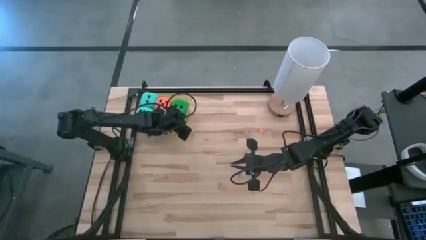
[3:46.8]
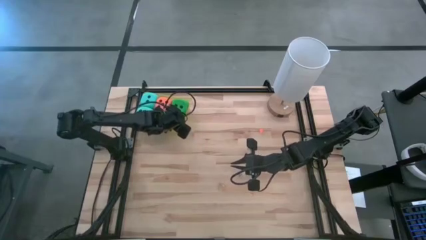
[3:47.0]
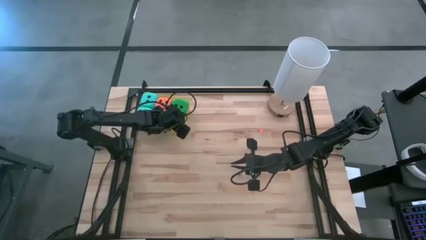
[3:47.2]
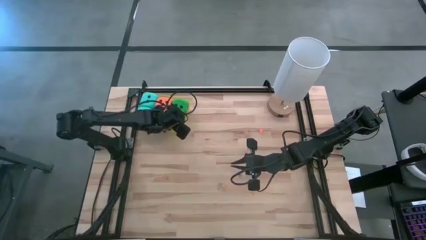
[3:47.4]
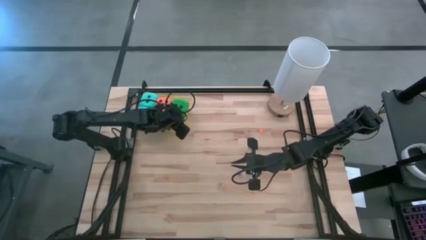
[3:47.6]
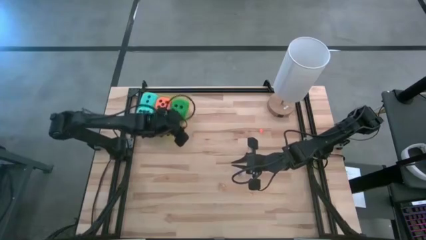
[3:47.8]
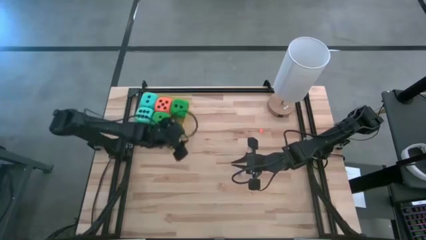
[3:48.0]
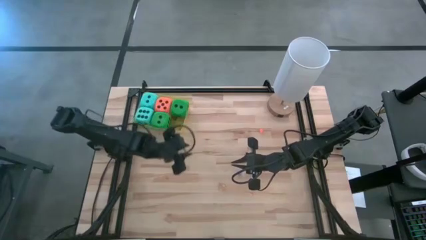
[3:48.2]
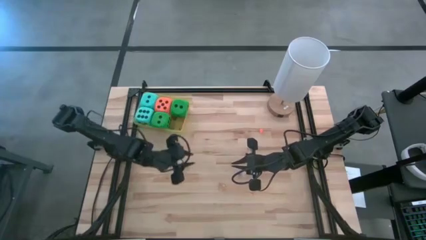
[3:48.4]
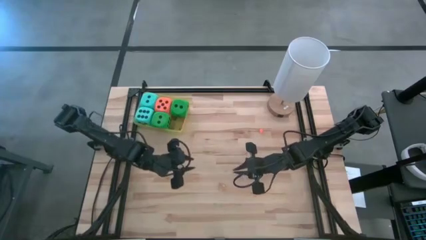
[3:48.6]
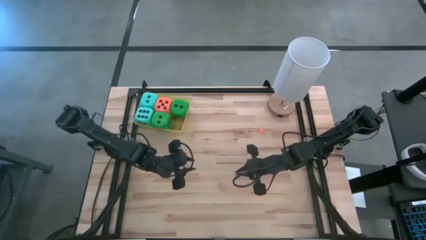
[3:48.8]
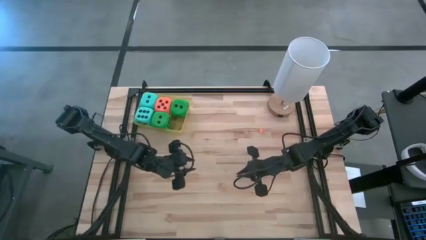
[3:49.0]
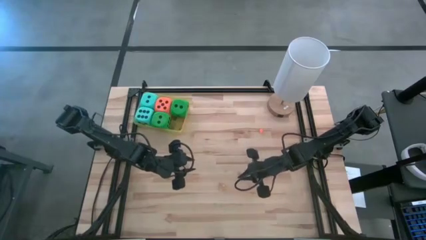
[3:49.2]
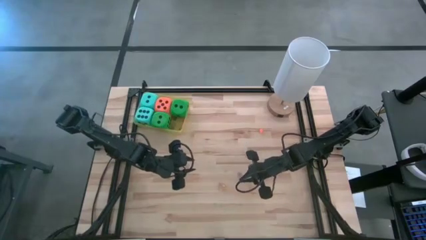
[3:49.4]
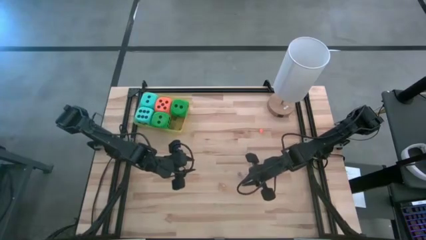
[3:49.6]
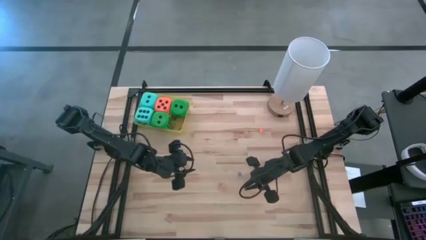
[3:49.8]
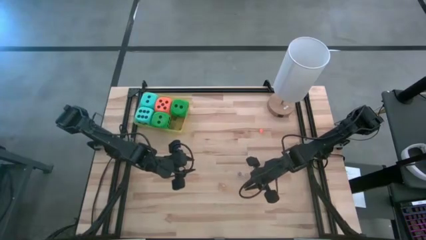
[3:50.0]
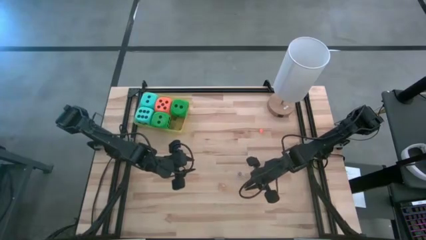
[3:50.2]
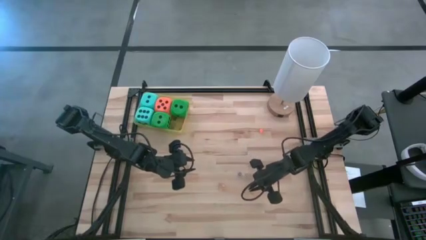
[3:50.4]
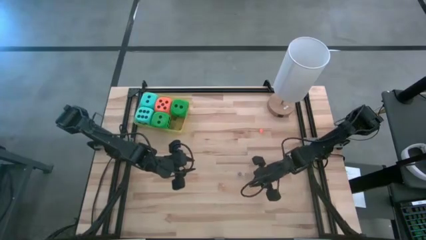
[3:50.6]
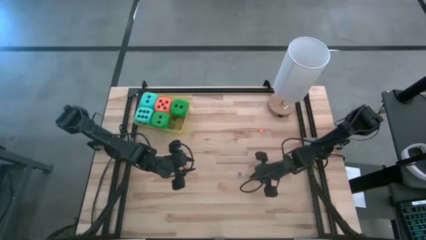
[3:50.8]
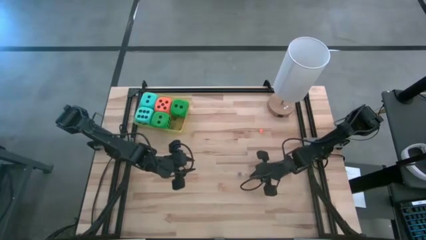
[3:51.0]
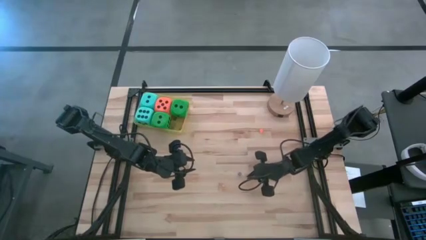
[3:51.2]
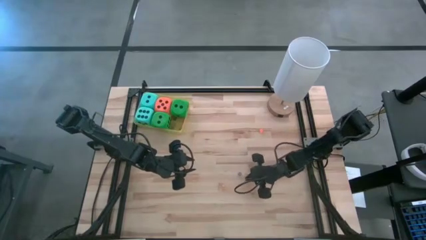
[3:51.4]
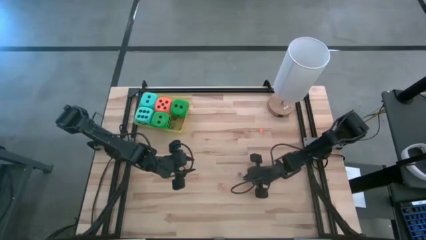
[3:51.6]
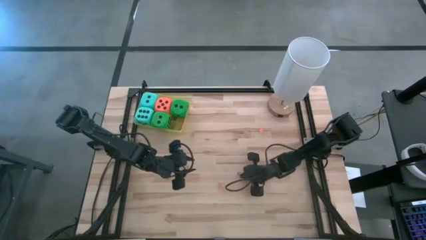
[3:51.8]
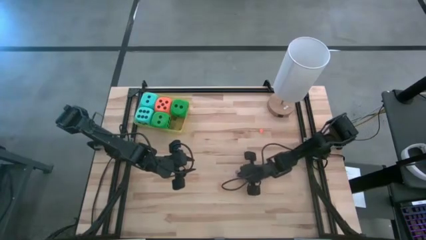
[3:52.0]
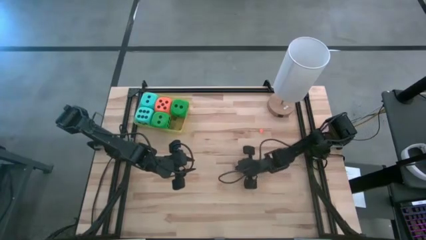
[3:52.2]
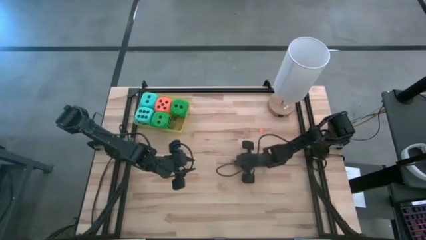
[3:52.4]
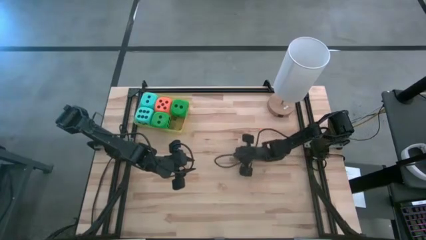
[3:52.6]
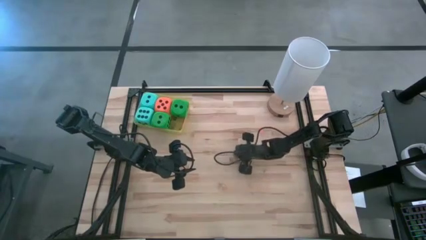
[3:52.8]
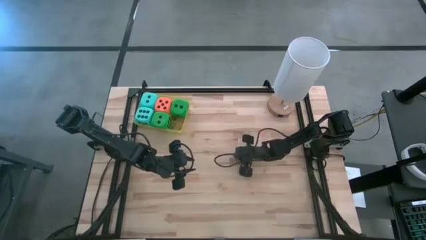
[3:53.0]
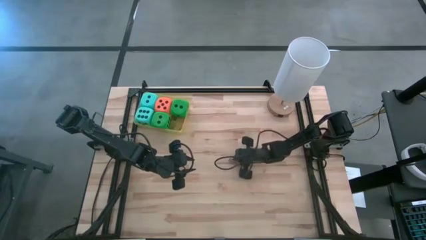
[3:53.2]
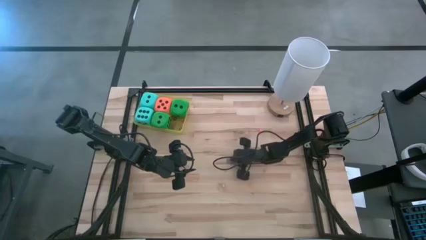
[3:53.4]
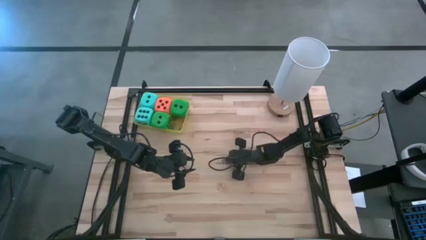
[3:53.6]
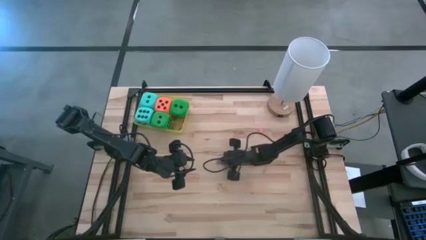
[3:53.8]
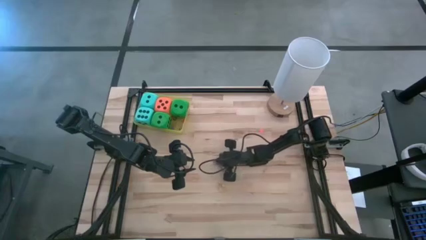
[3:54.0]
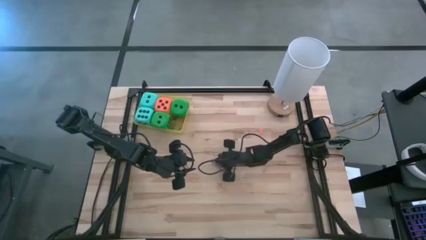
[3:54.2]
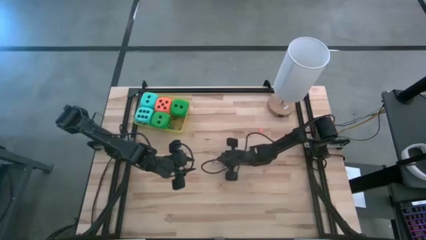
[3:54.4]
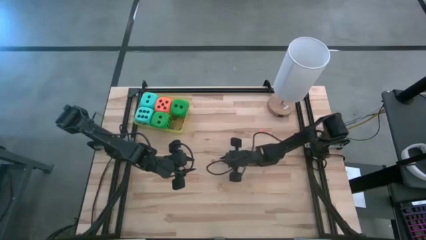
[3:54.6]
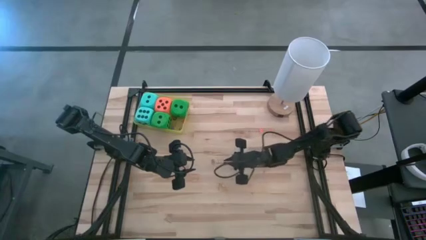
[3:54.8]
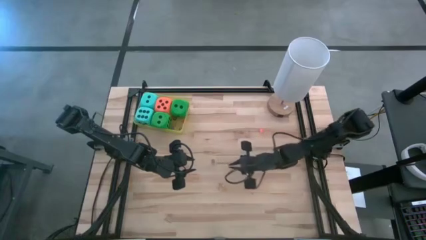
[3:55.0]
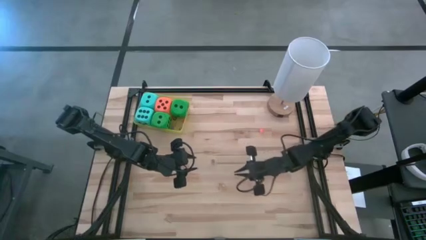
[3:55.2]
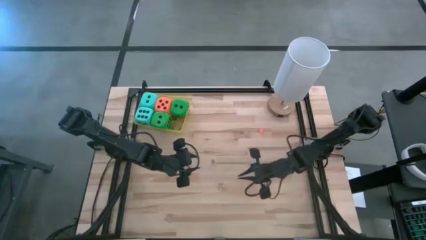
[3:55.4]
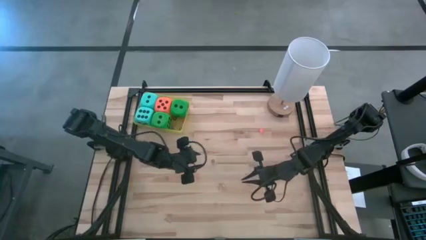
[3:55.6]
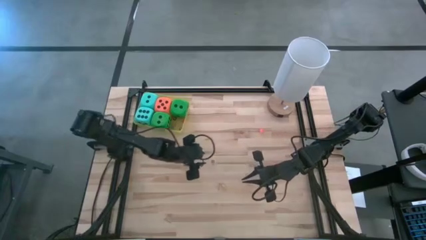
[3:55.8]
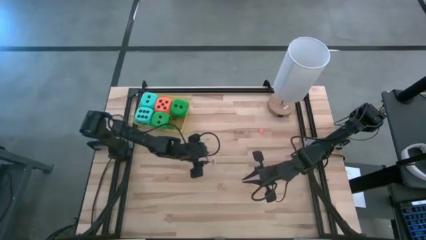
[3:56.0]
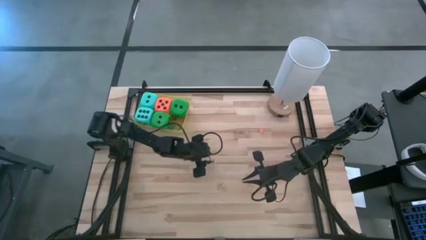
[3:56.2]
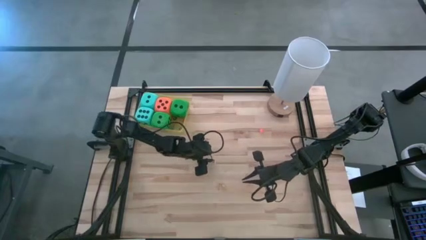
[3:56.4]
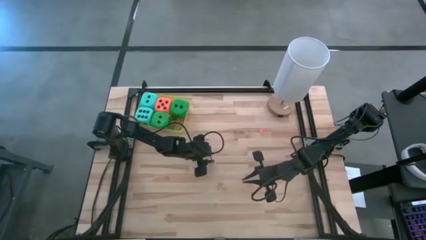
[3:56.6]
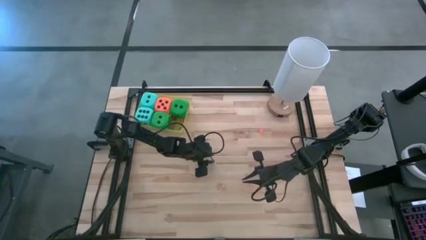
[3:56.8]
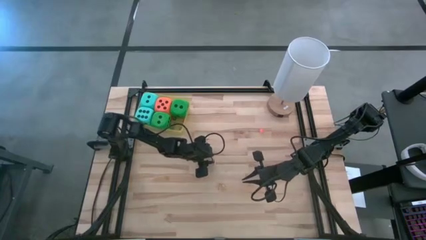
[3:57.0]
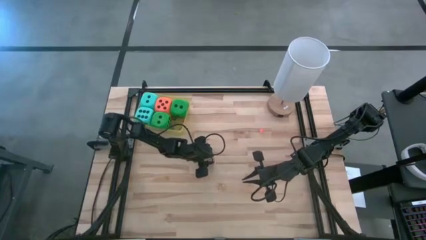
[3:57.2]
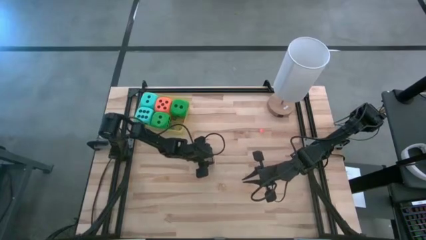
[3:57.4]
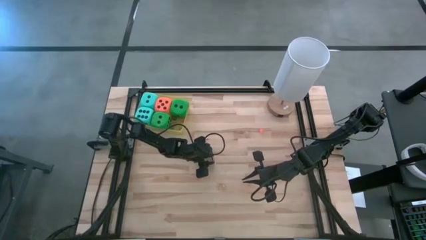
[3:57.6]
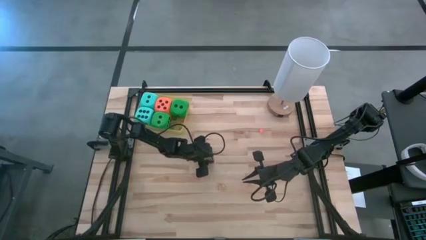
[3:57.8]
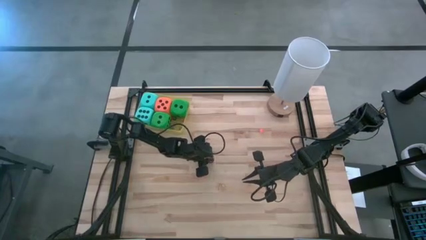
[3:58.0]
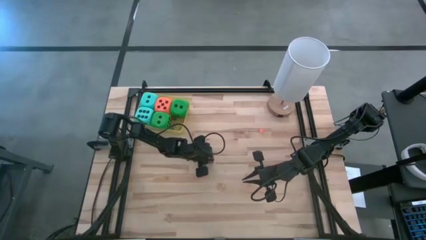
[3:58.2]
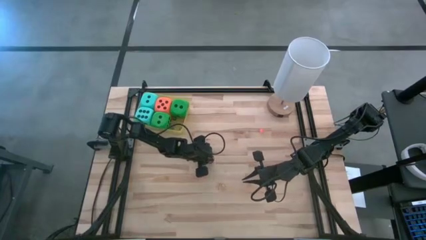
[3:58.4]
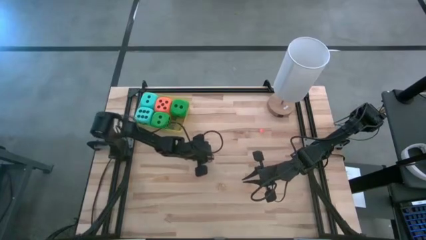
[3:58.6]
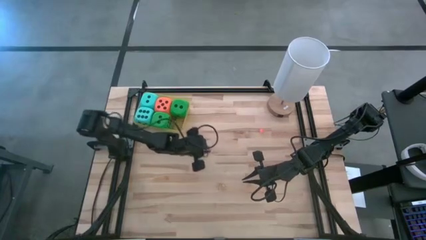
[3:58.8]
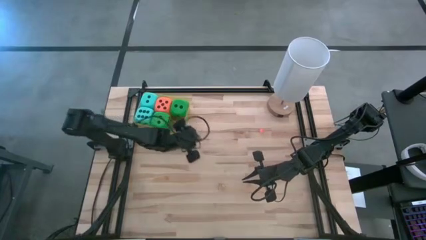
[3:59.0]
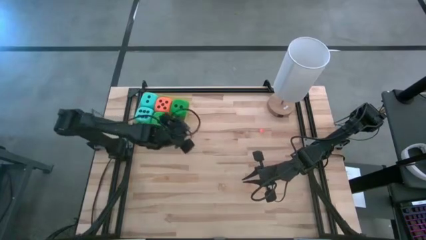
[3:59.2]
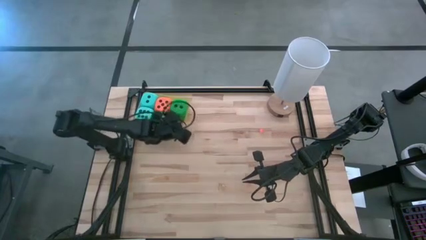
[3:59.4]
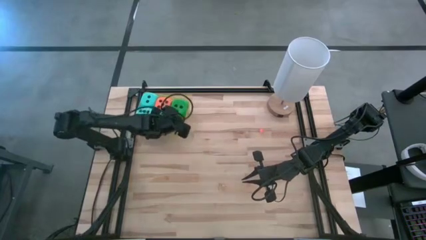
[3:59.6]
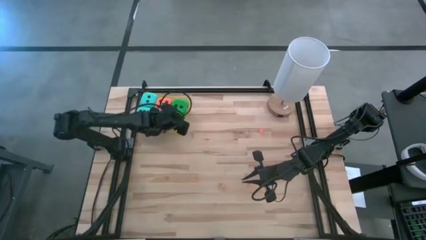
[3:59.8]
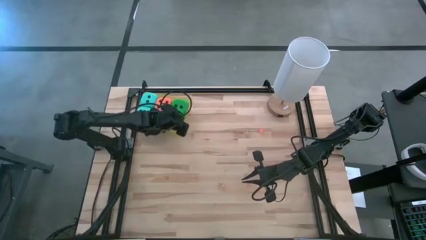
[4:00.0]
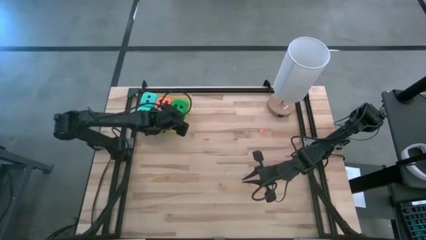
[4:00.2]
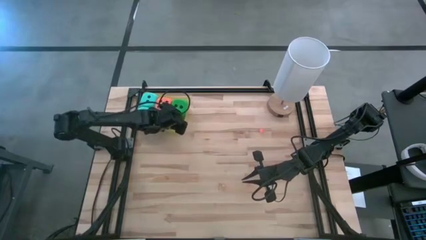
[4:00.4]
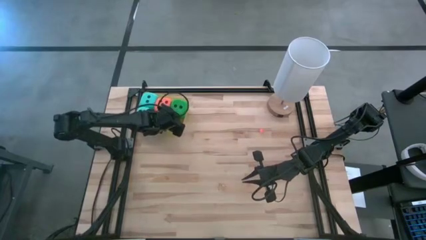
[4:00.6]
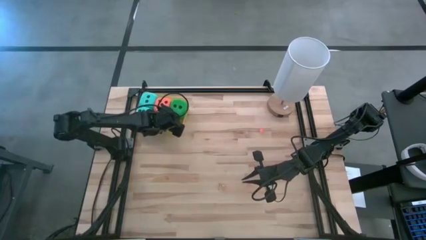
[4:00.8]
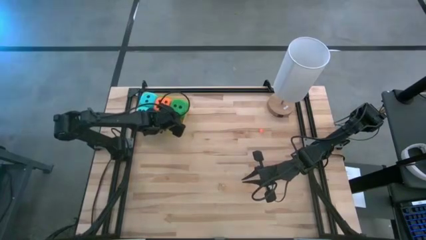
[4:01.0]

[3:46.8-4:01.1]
Task: Pick & Place Dice
Put the violet small die into the yellow container
